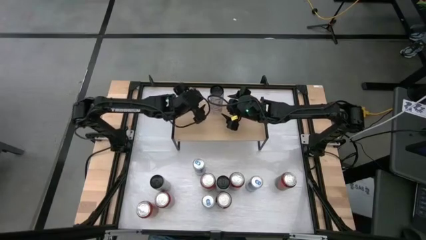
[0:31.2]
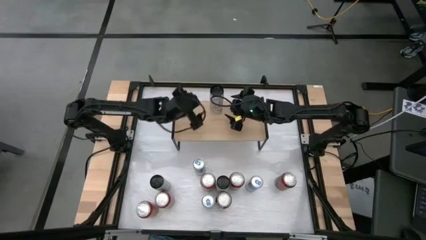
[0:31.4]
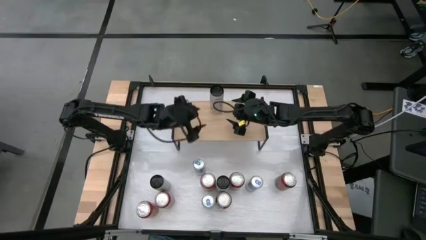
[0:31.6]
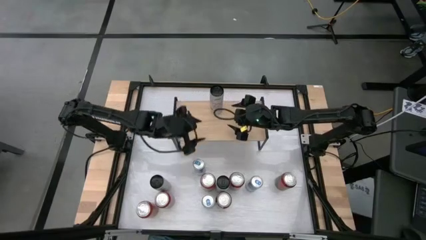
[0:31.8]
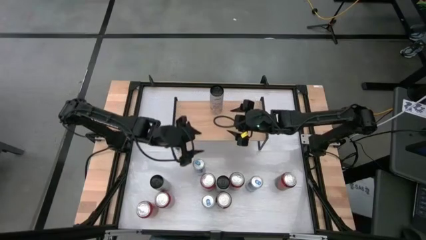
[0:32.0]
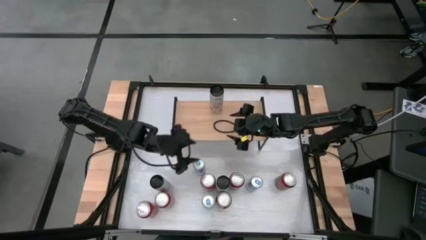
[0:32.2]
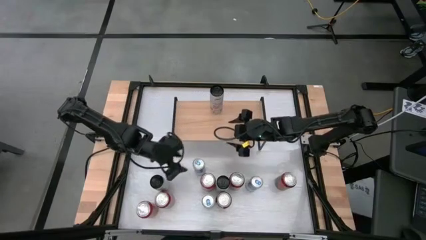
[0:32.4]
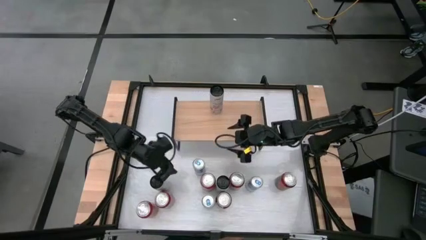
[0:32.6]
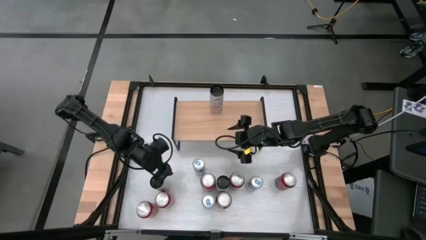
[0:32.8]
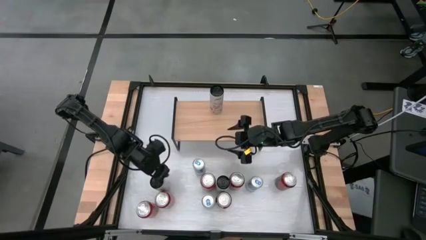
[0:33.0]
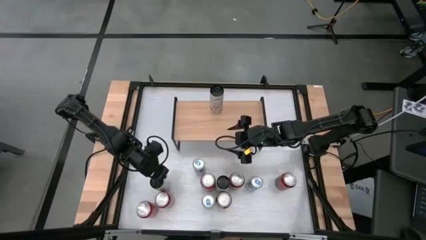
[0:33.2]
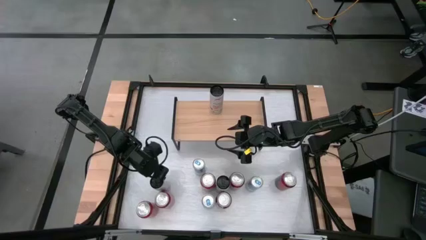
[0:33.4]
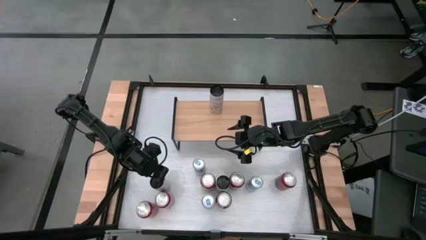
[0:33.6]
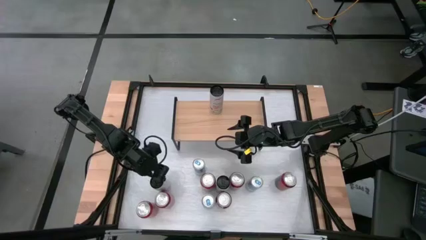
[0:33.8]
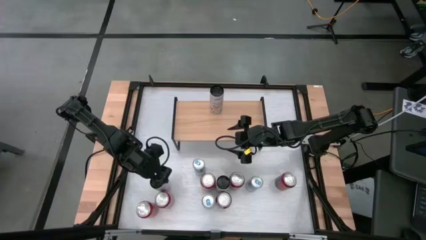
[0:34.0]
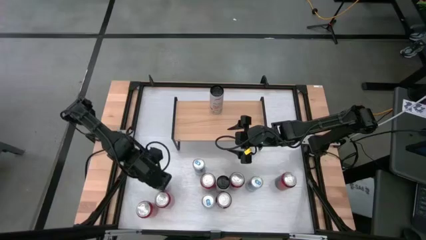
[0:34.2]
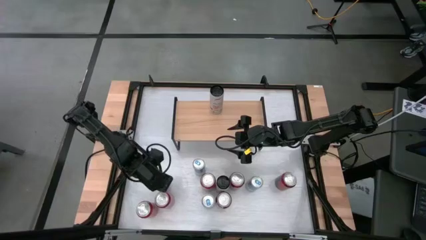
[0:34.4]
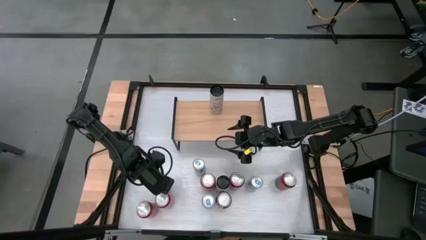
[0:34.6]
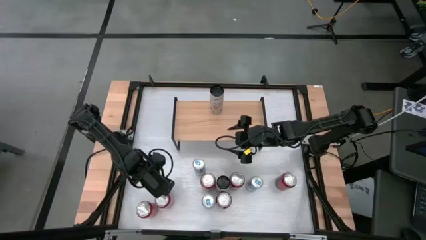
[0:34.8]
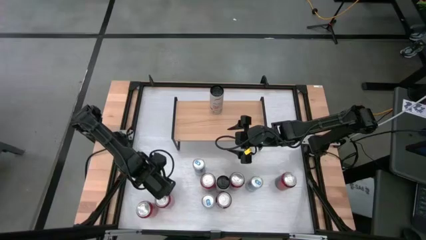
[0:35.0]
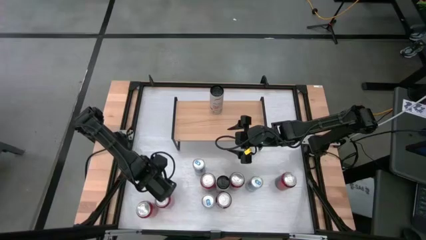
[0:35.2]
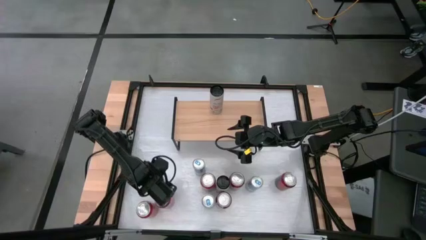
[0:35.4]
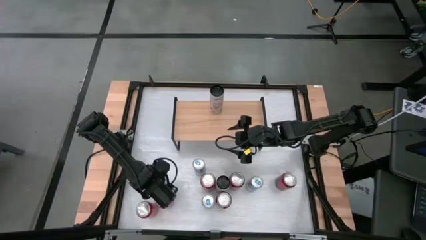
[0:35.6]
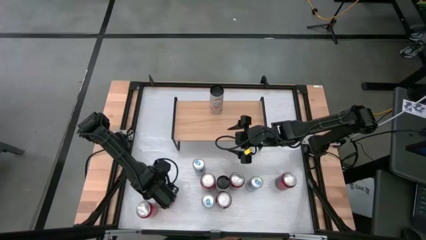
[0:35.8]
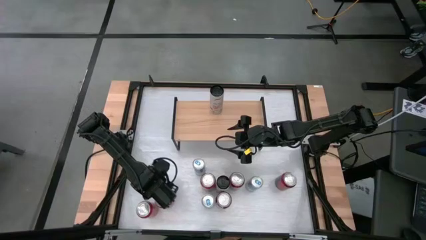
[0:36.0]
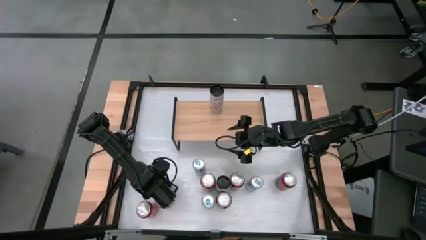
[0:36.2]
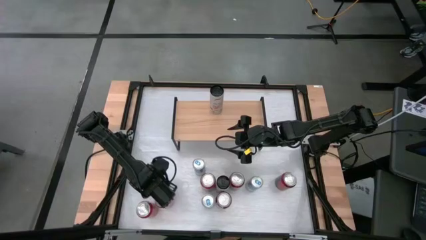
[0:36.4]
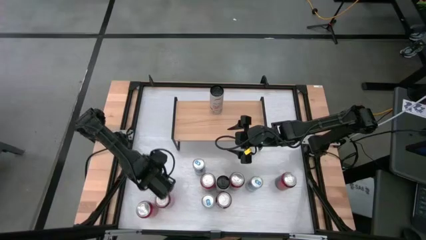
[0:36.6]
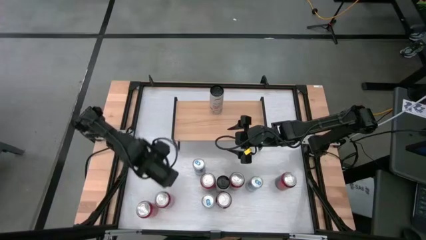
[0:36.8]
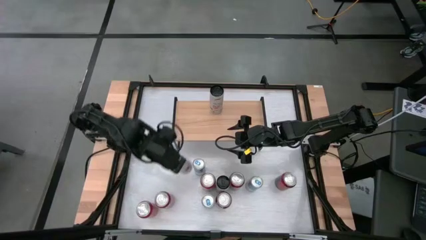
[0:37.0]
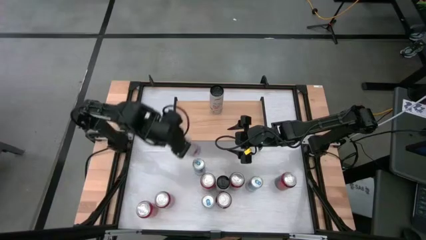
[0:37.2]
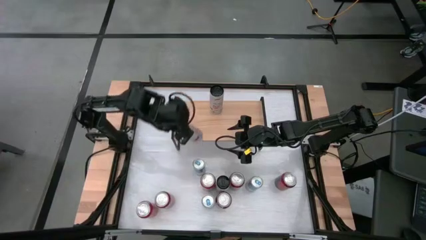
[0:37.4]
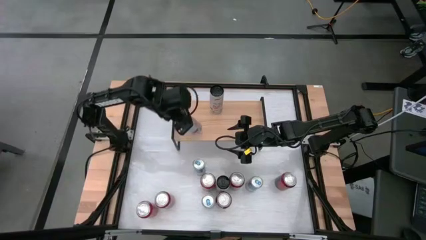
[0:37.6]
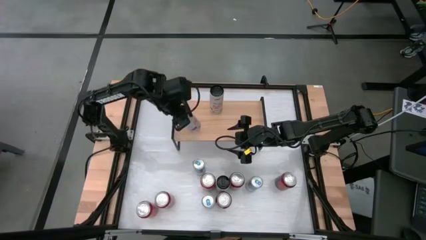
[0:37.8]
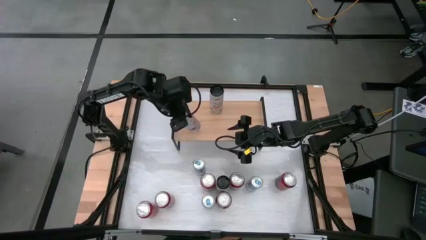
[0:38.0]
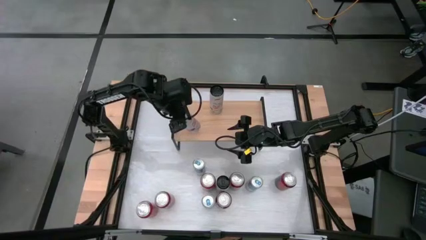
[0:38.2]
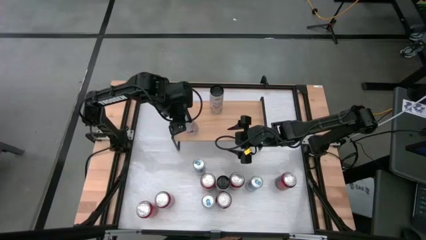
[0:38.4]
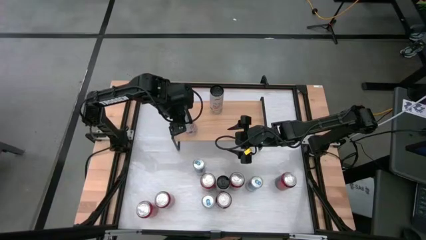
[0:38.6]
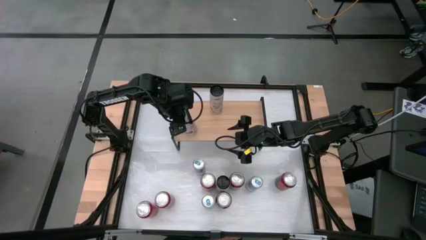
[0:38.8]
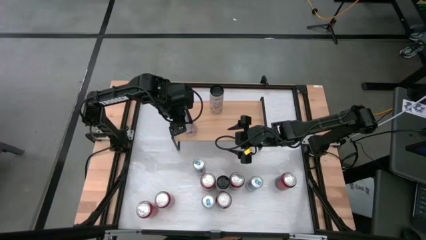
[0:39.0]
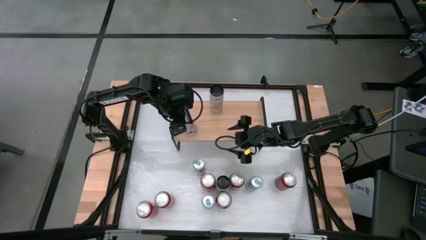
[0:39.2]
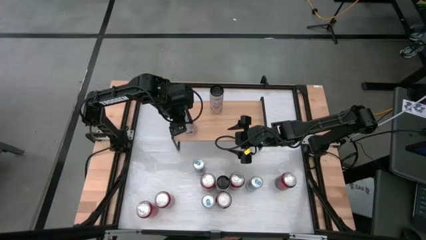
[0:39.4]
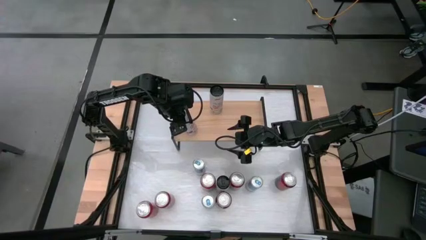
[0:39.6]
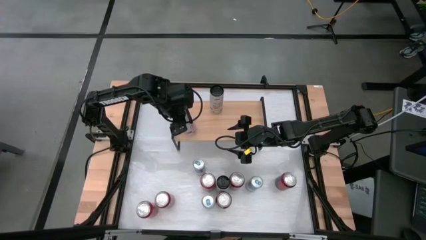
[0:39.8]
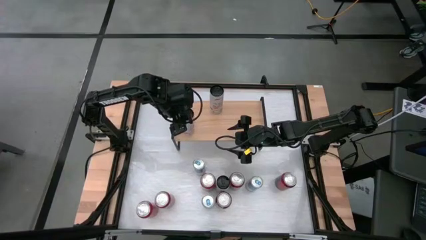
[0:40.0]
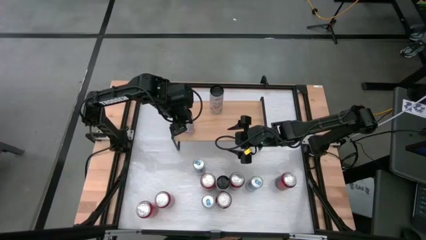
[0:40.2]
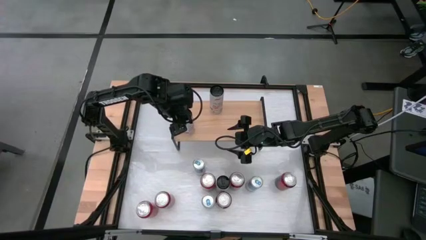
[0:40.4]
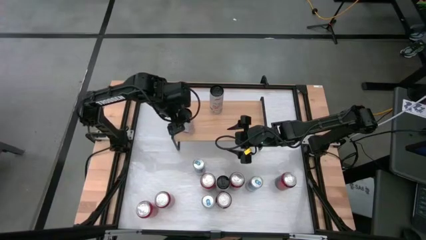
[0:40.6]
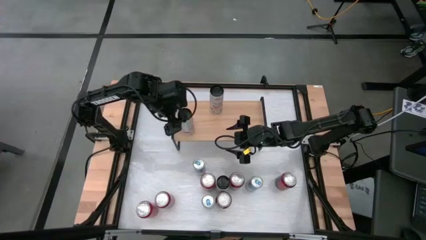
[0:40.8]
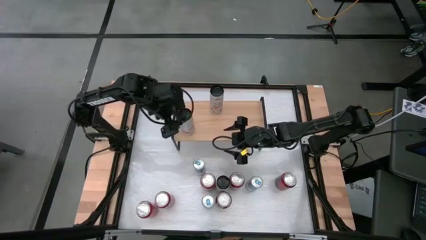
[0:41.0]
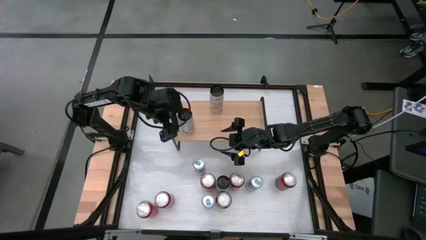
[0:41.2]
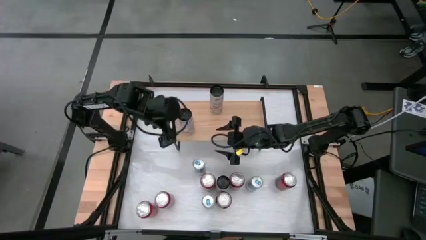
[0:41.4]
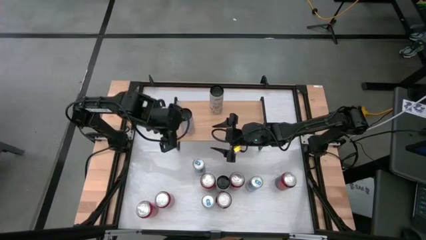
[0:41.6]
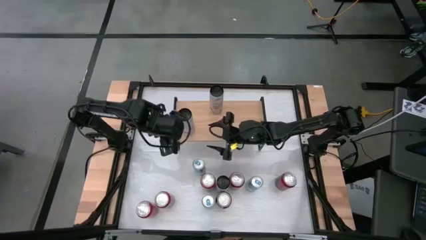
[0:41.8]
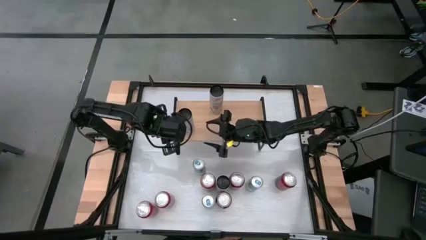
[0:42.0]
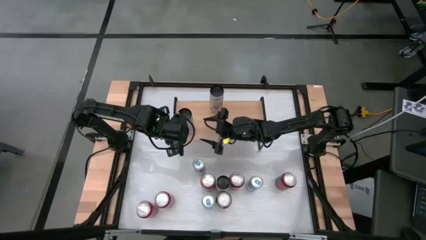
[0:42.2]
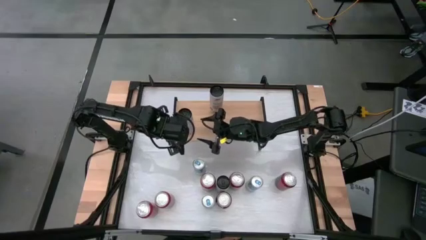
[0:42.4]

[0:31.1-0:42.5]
Task: Place canned beverage on shelf
Put the left white soda can on the shelf

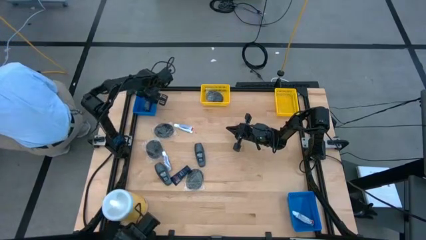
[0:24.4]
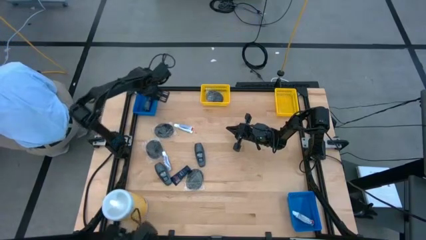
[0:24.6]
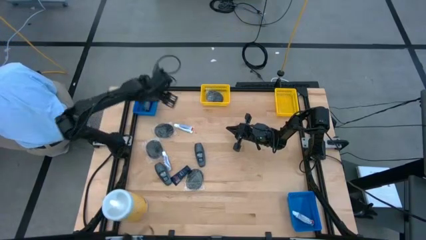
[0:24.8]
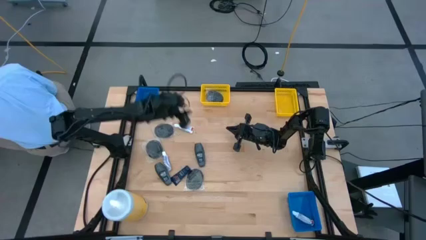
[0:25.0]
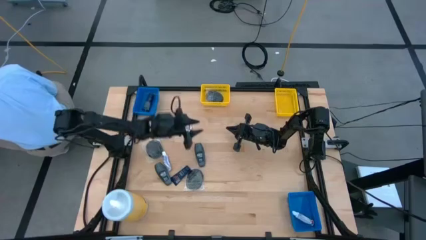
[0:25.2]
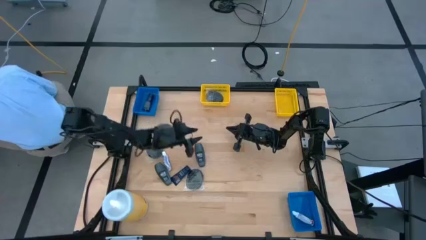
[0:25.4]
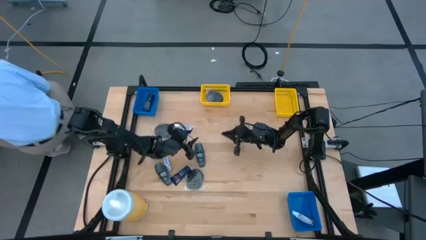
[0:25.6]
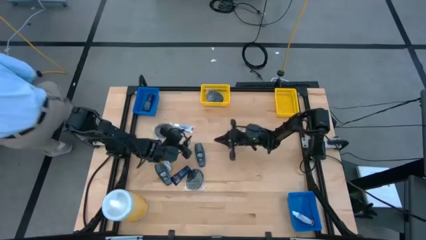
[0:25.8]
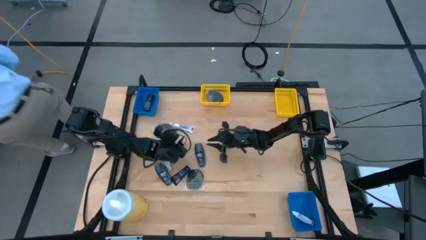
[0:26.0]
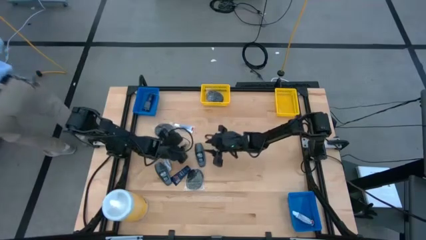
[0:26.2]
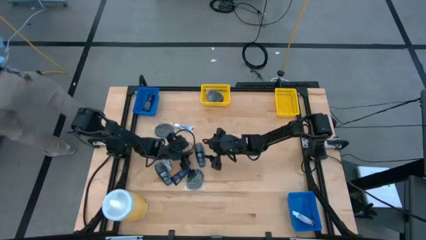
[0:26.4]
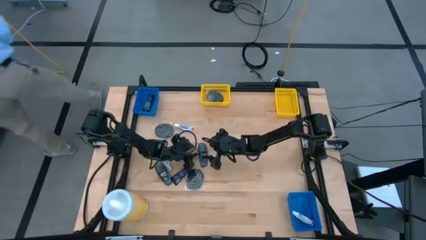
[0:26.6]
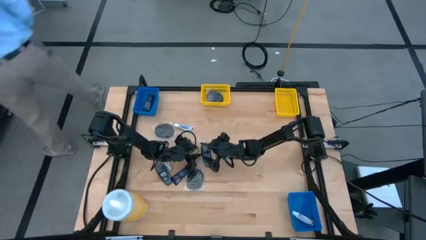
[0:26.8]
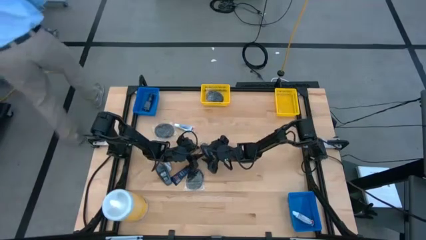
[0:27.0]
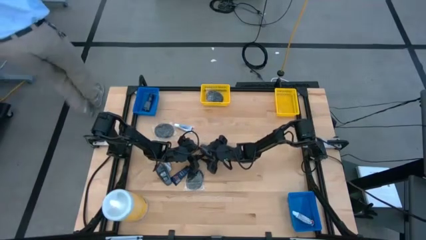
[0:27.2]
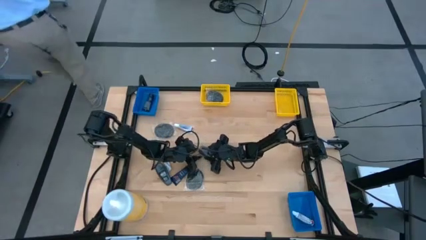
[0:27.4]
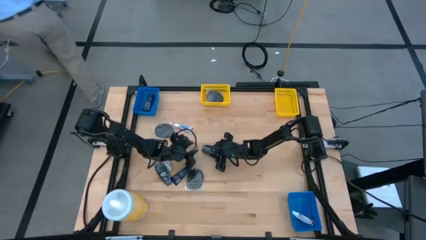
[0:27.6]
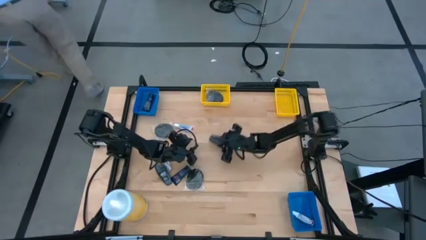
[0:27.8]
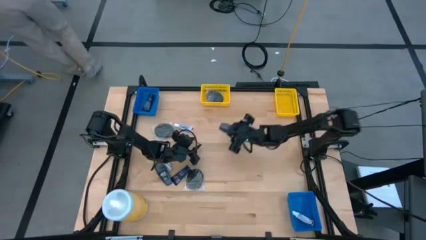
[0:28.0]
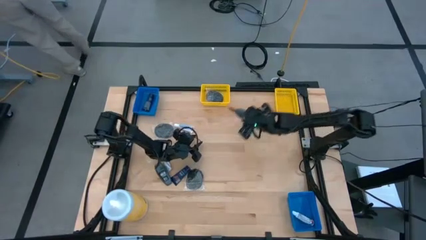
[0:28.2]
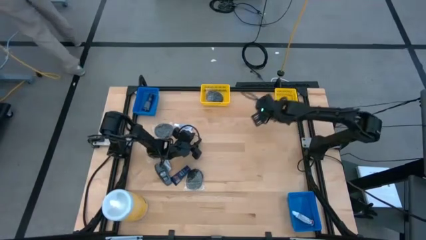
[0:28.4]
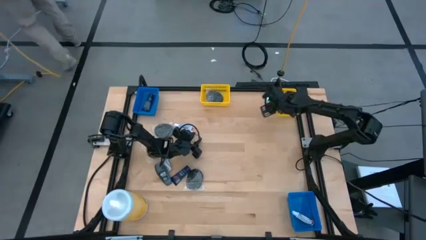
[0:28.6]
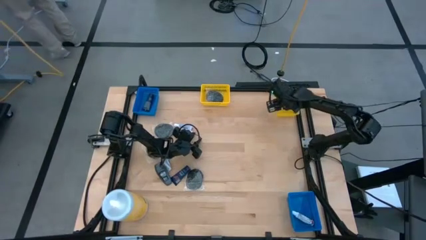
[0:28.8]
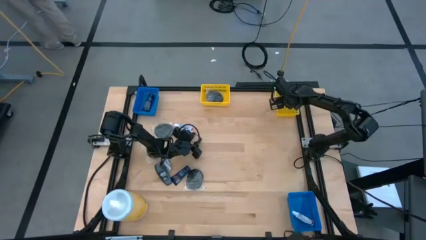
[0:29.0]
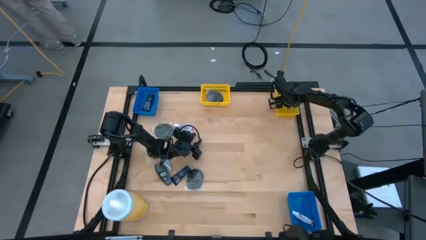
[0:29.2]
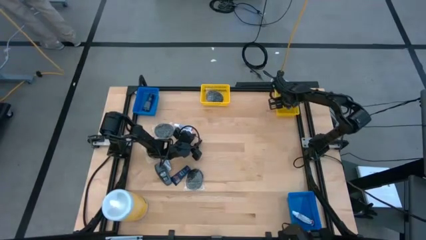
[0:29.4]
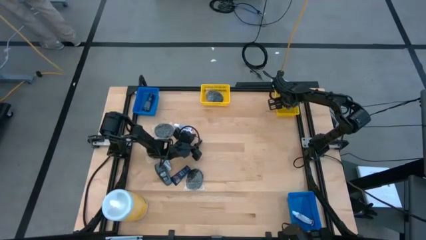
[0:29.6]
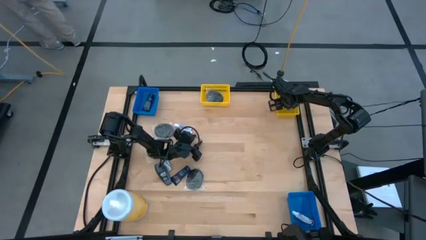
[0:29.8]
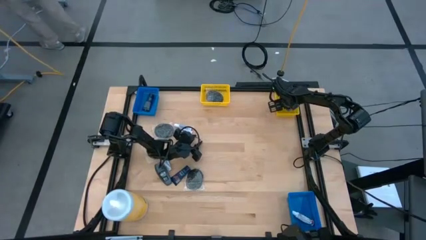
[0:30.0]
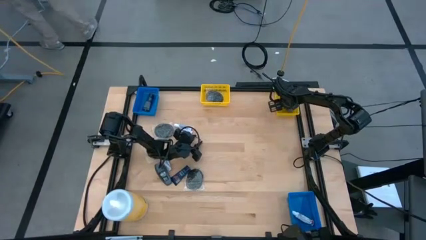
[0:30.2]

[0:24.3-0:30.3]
Task: Pick & Place Travel size toiletries
Put the right deodorant into the right yellow bin
